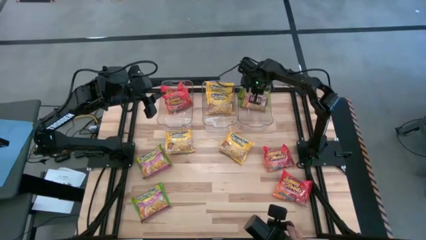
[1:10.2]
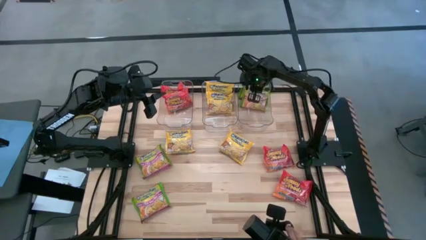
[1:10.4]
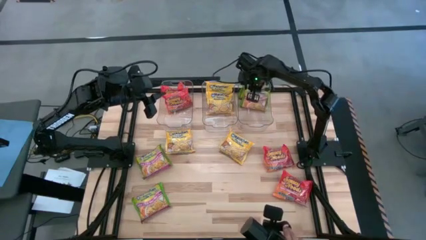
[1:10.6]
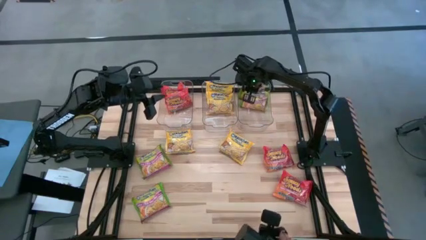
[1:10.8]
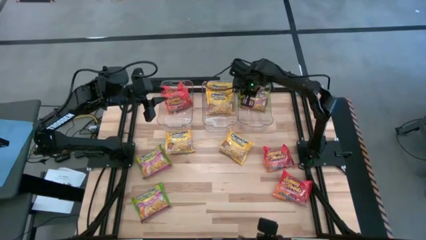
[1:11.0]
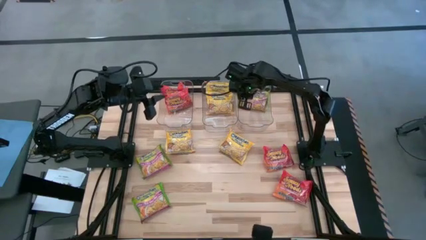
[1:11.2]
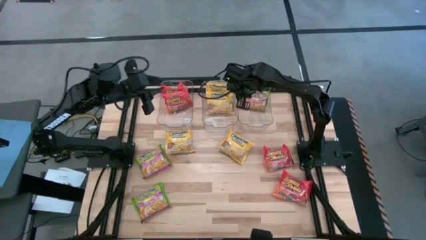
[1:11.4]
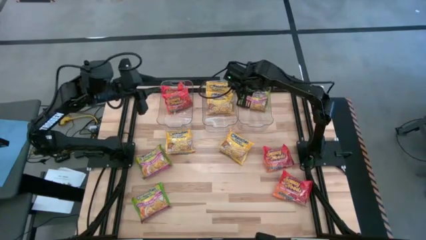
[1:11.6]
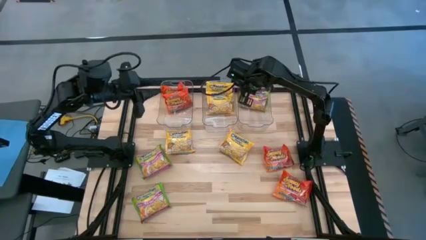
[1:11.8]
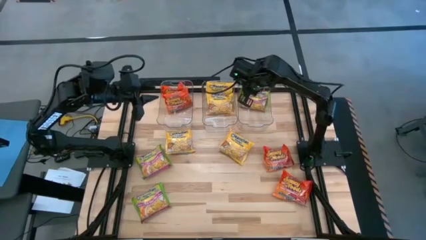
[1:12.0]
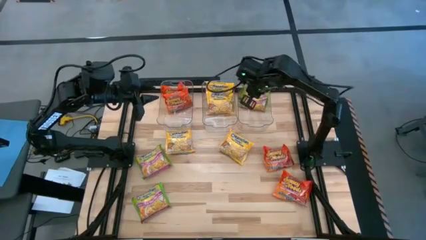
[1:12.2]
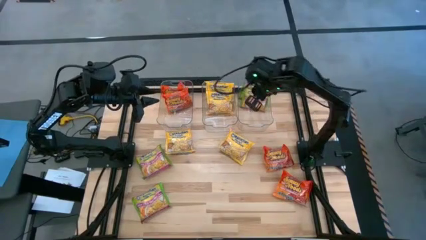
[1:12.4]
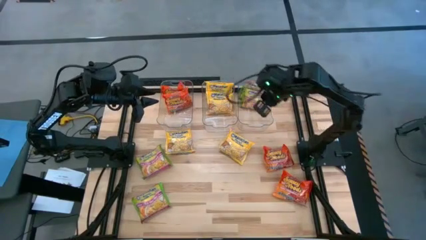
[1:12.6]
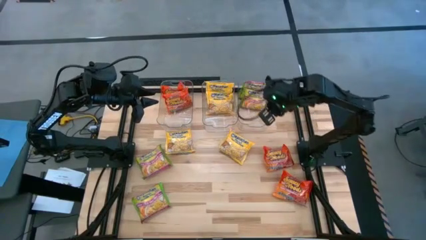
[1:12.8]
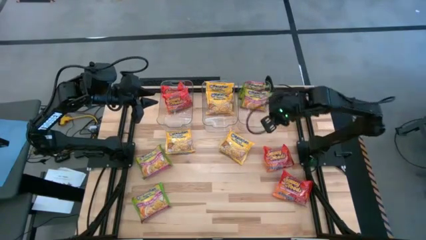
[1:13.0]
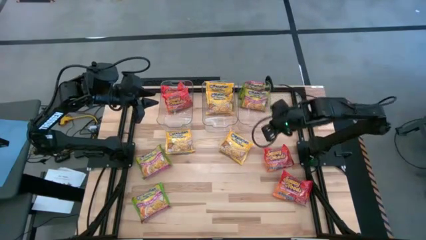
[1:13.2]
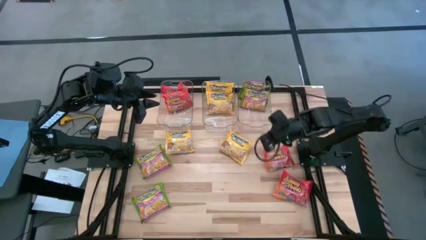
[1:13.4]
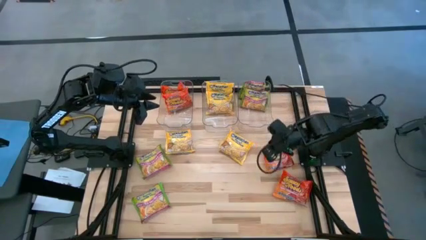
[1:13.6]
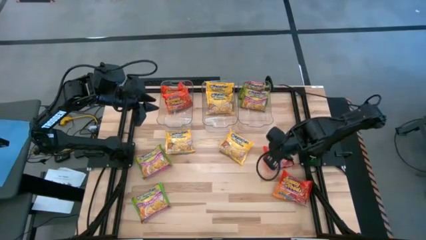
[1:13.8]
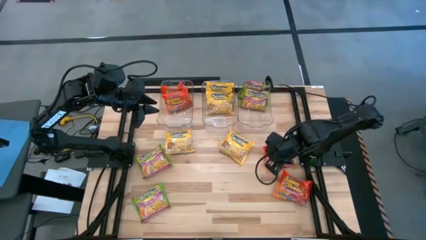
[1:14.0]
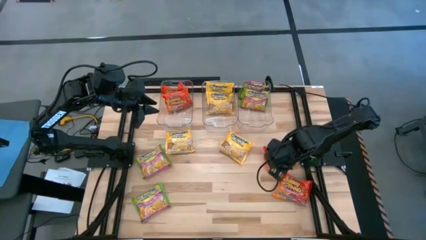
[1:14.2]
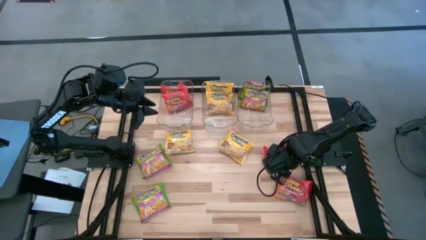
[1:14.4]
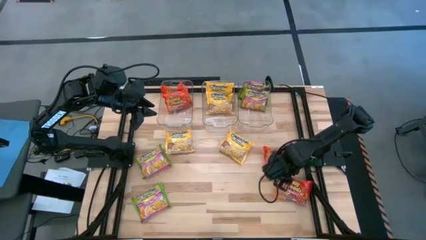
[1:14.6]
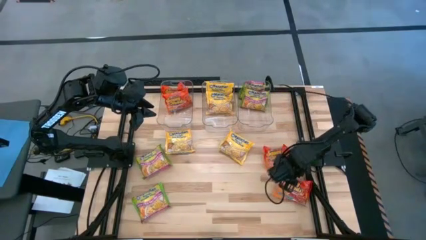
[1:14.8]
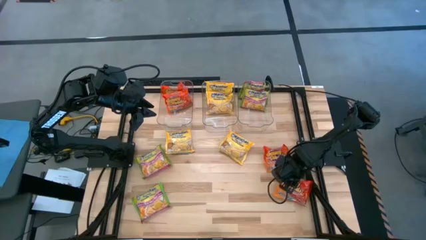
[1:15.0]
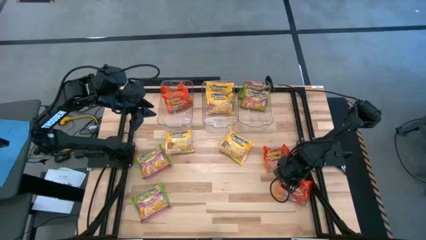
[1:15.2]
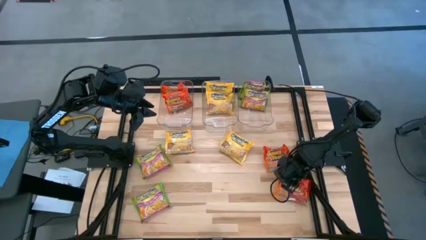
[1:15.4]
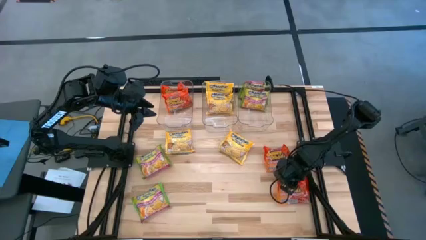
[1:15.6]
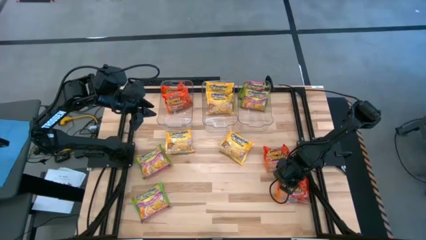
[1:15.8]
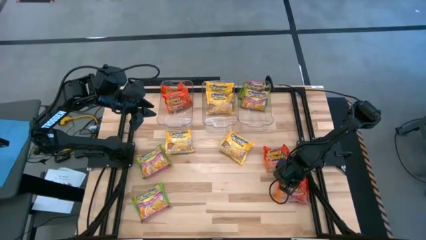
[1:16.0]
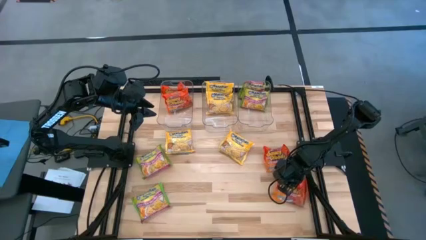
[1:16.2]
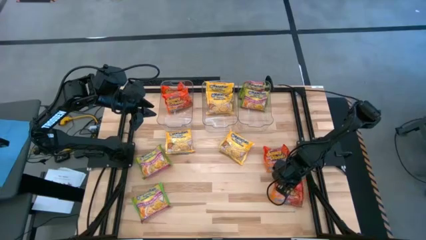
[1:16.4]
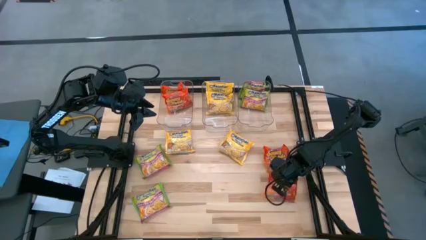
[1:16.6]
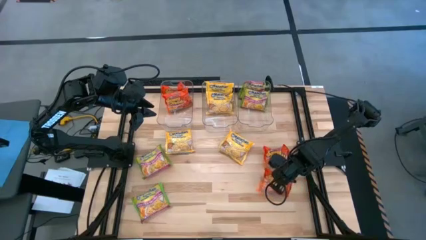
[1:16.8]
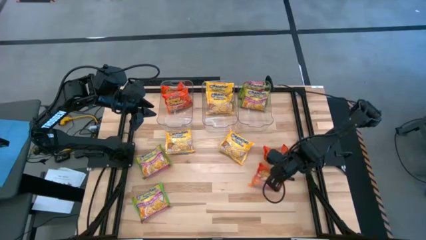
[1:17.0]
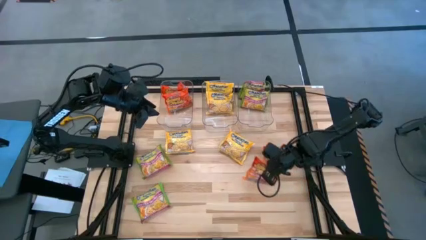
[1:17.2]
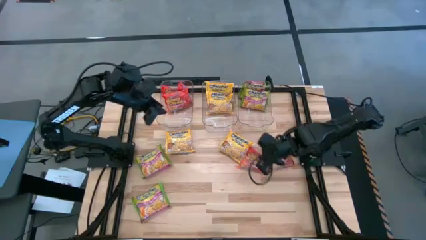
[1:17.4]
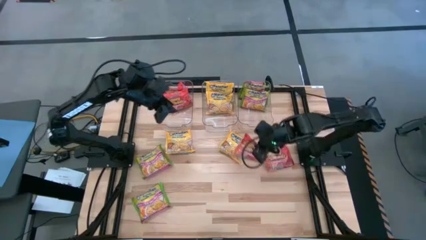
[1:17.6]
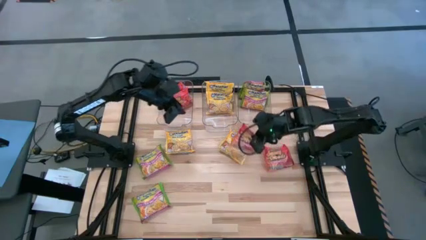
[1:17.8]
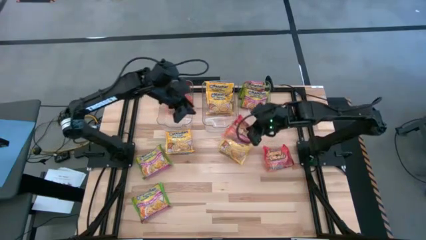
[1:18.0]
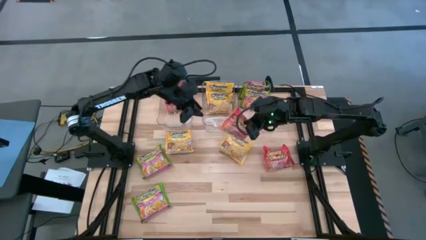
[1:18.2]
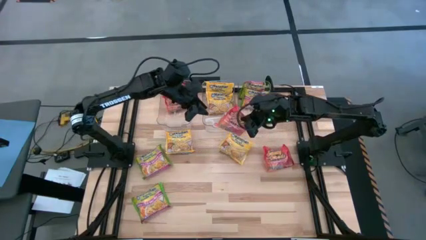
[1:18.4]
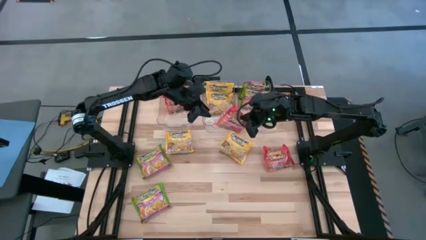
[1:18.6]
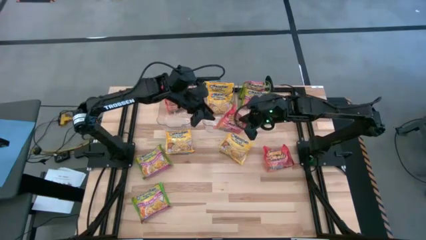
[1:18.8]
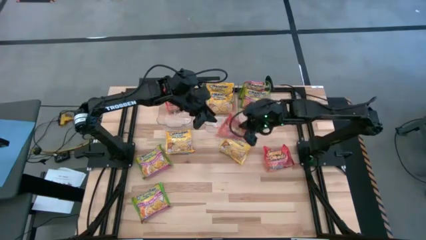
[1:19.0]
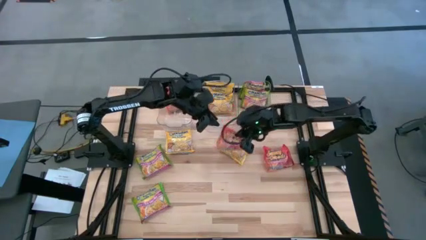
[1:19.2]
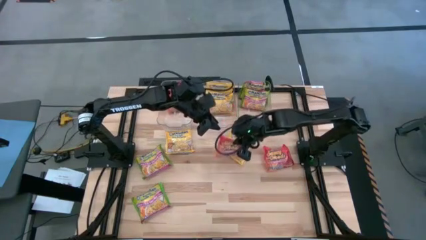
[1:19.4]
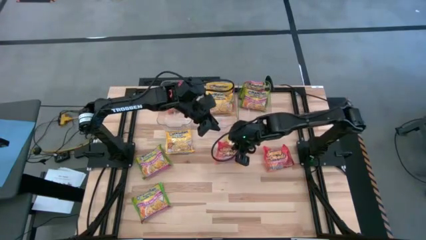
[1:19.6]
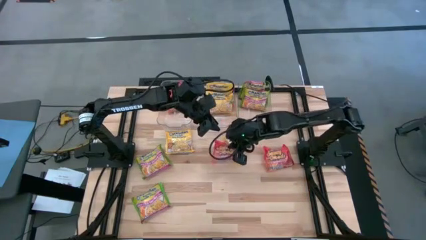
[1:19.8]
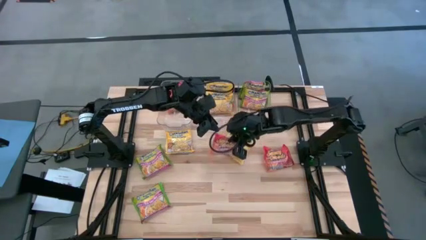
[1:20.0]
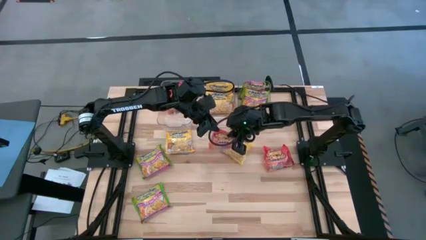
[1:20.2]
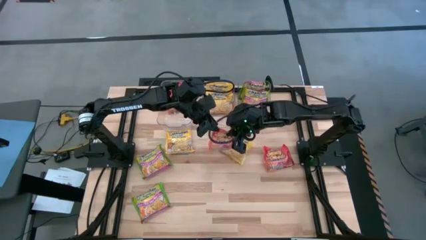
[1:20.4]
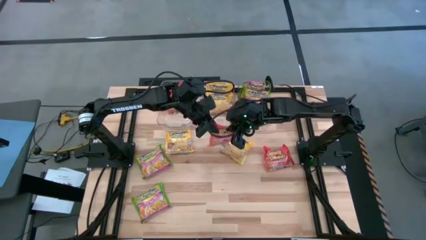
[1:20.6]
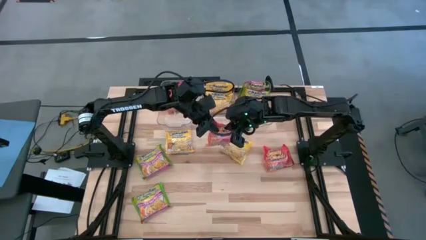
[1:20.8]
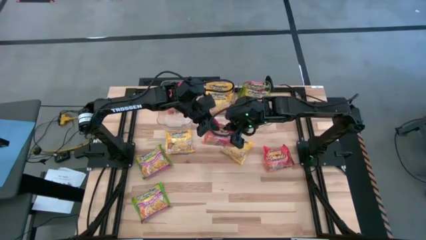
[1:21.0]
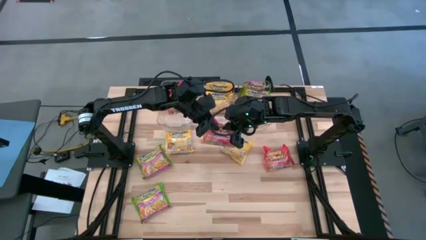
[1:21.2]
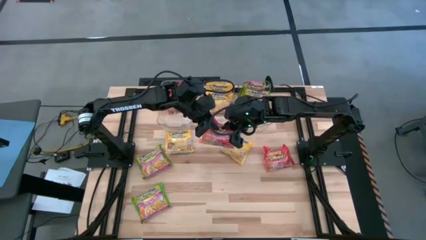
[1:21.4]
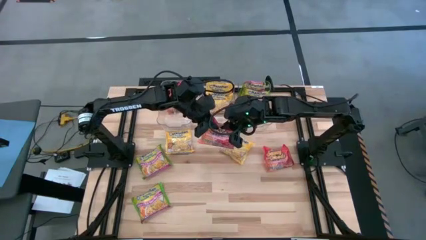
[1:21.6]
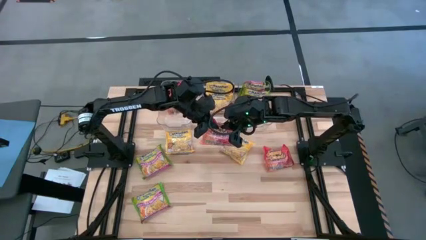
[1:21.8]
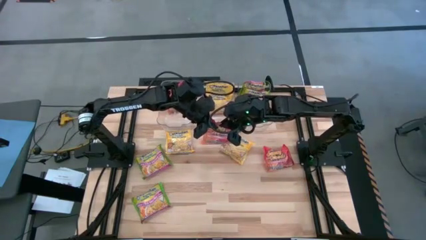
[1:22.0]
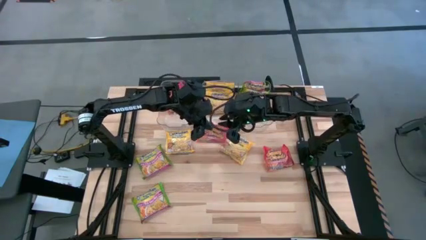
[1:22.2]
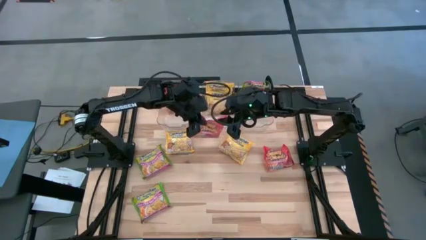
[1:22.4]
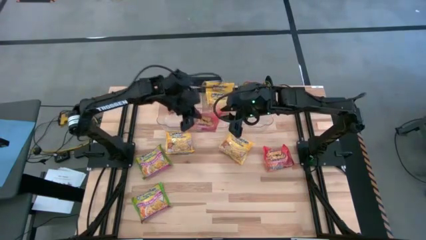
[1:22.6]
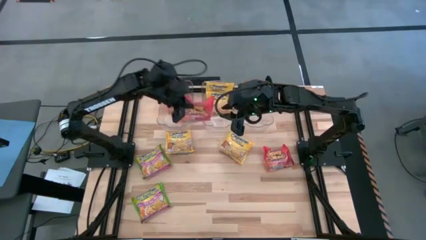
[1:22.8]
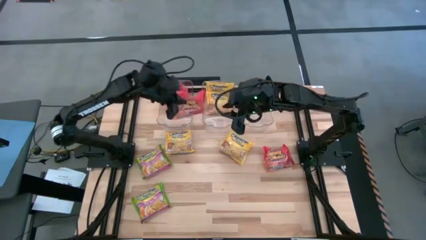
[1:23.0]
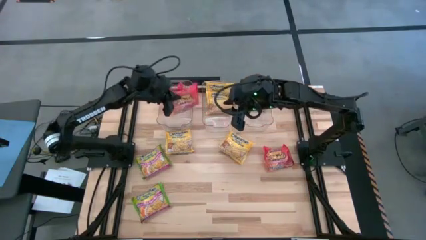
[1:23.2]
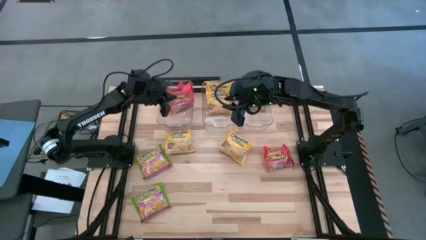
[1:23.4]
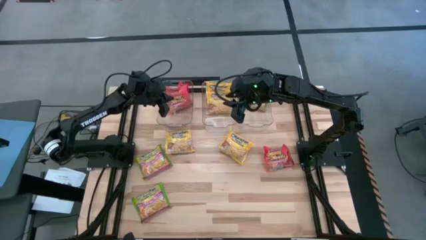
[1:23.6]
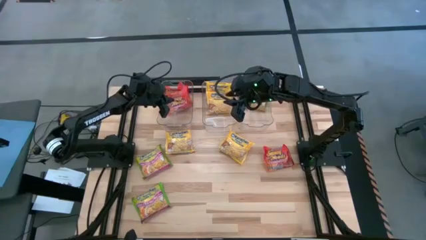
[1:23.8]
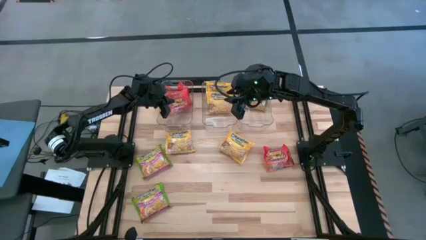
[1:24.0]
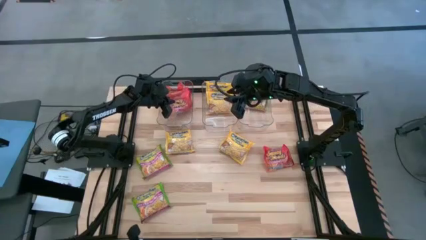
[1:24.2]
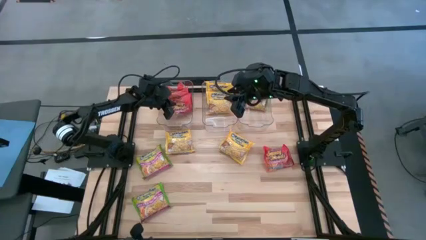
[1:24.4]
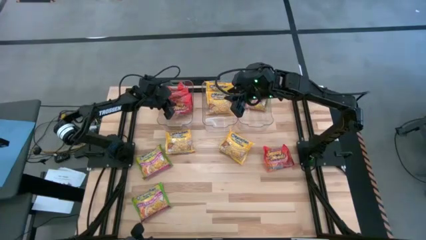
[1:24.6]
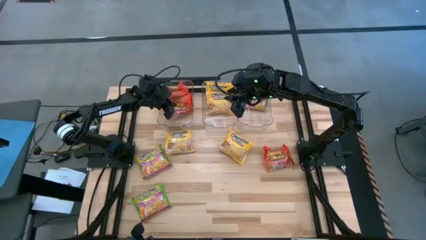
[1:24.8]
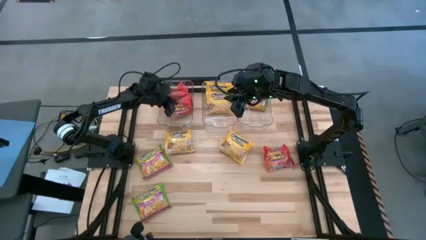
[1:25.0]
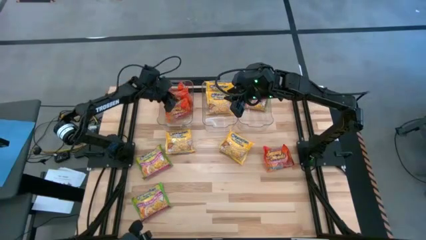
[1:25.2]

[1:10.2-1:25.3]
Task: Sort Maruchan noodles
Put the orange noodle pack into the left transparent bin

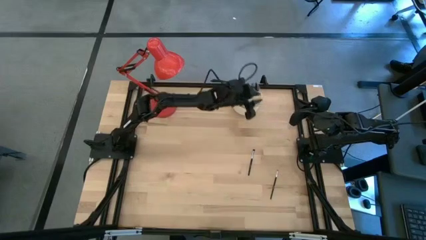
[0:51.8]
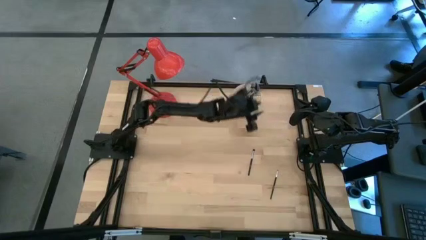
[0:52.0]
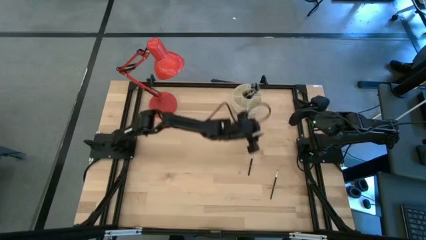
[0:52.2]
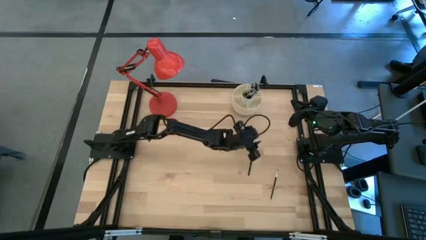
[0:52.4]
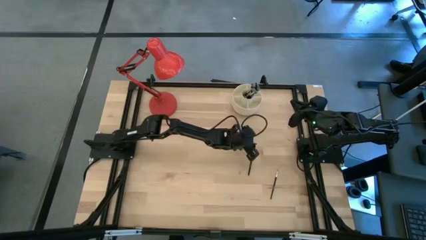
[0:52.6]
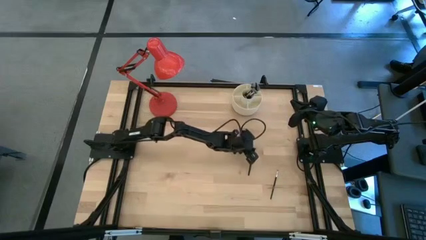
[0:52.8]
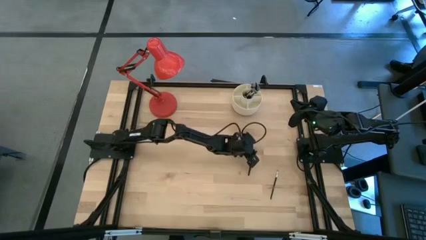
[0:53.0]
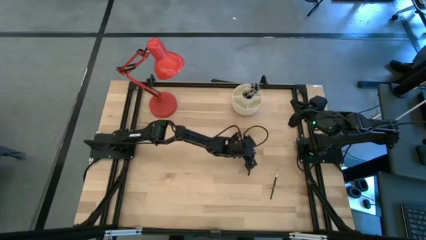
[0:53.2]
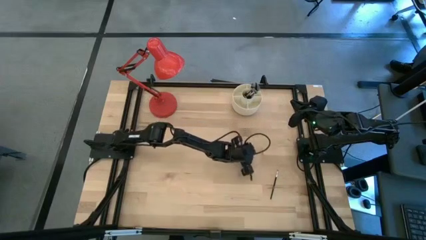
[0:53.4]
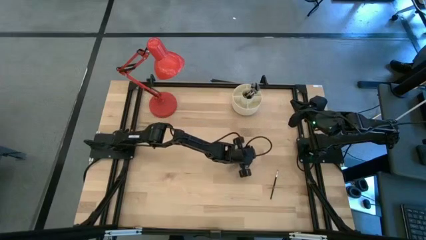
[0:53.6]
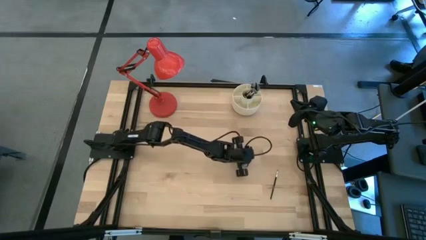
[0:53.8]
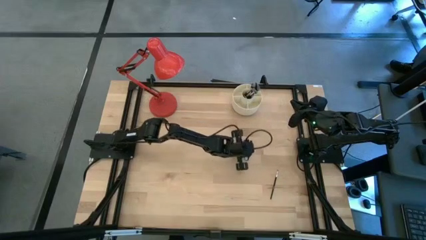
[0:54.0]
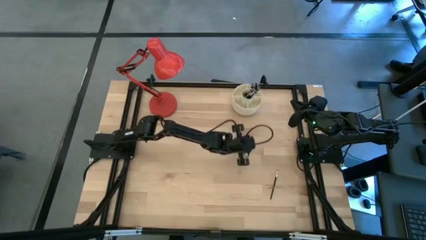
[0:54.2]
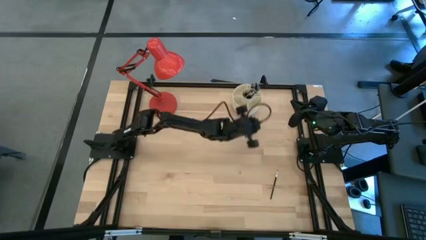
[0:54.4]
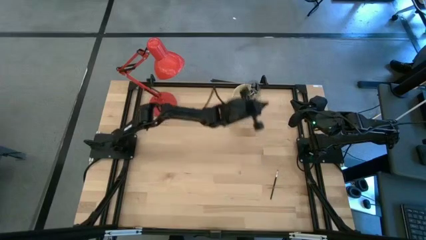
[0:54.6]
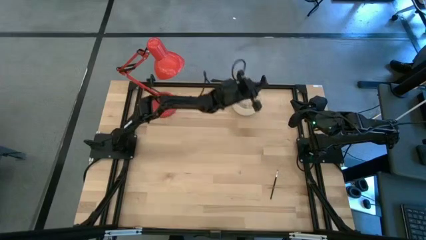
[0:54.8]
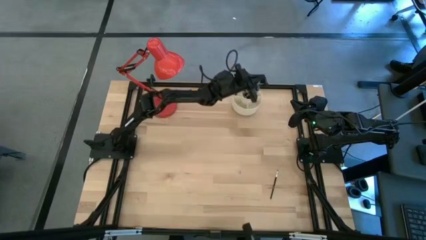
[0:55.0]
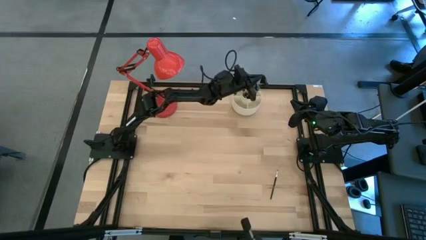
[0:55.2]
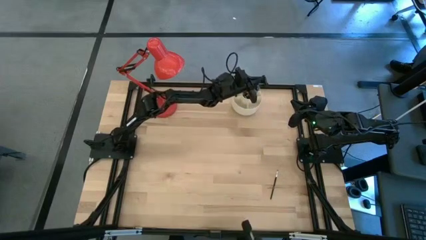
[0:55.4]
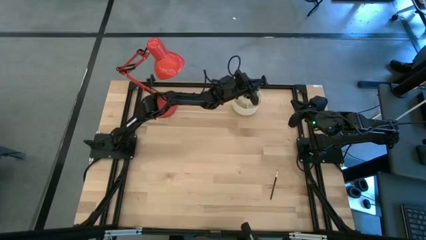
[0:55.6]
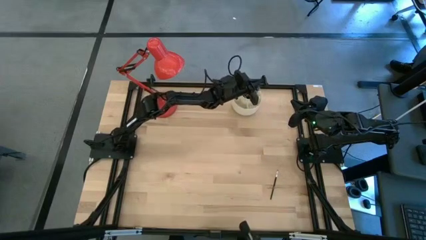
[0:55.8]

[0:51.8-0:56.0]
Task: Put items in baskets/containers
Put the black eyeshadow brush into the white organizer
